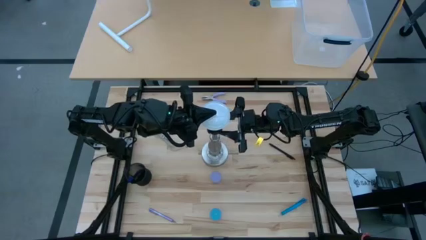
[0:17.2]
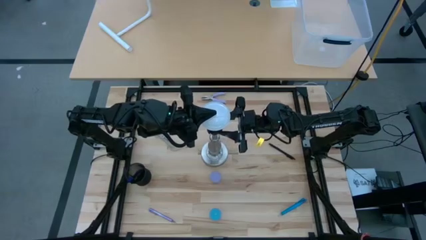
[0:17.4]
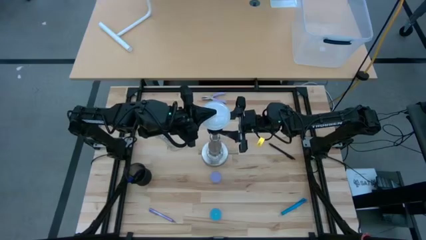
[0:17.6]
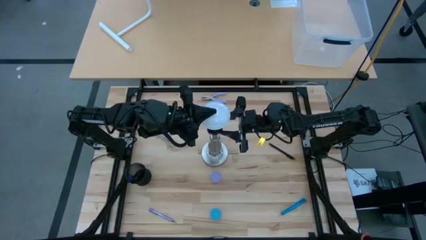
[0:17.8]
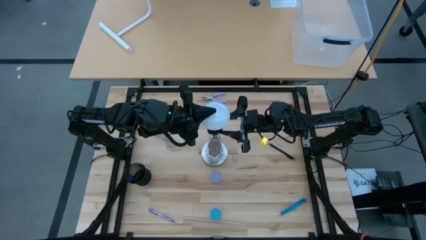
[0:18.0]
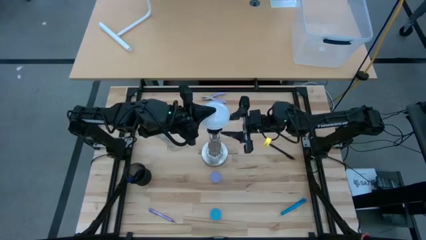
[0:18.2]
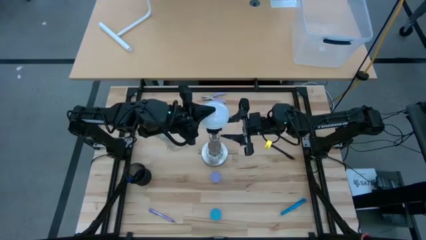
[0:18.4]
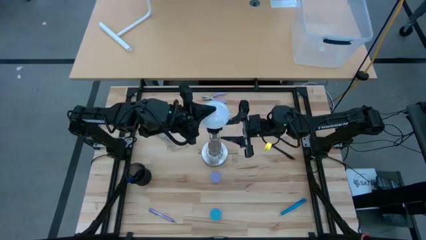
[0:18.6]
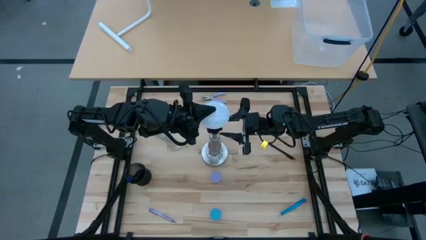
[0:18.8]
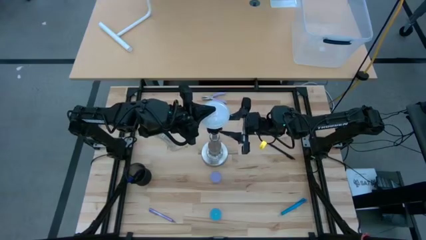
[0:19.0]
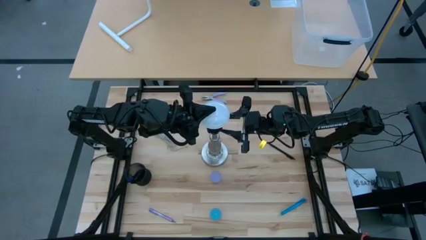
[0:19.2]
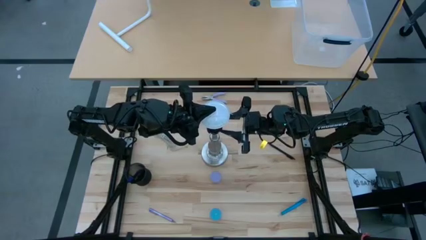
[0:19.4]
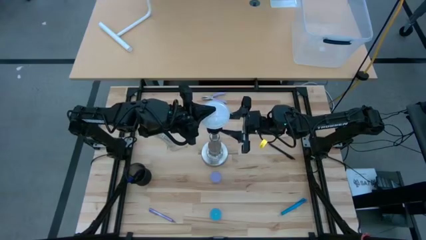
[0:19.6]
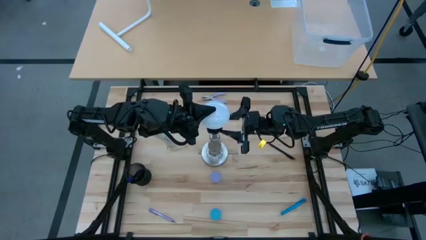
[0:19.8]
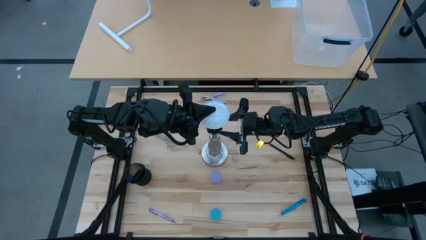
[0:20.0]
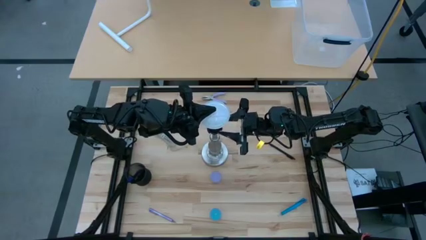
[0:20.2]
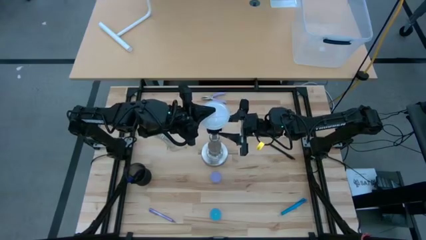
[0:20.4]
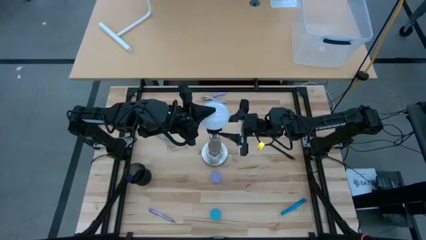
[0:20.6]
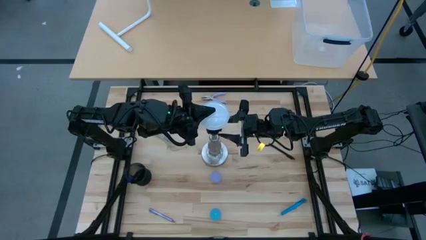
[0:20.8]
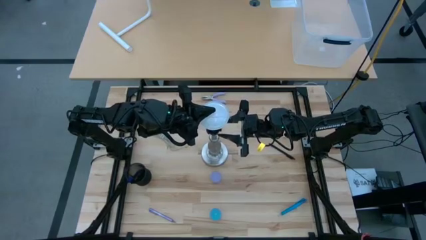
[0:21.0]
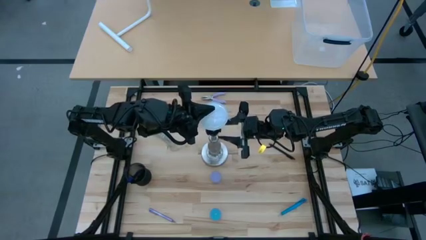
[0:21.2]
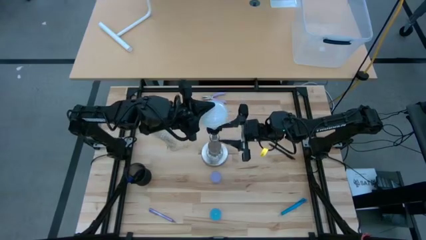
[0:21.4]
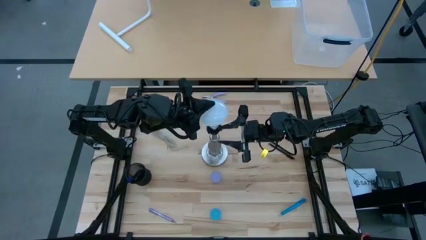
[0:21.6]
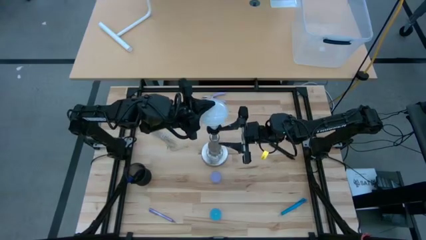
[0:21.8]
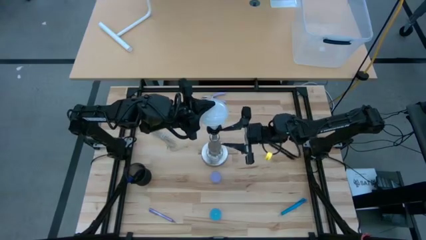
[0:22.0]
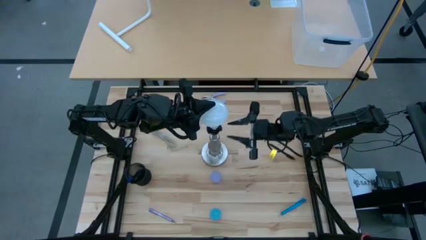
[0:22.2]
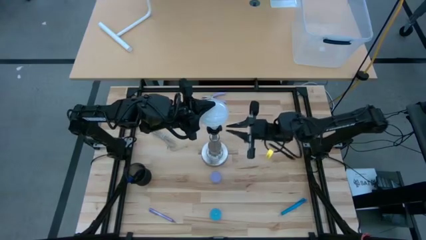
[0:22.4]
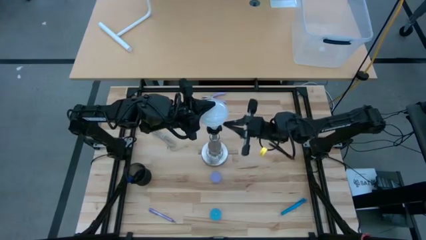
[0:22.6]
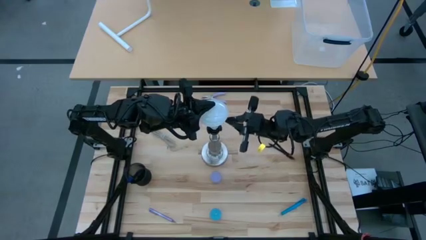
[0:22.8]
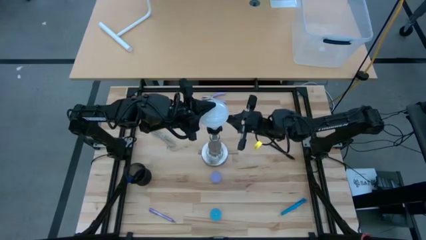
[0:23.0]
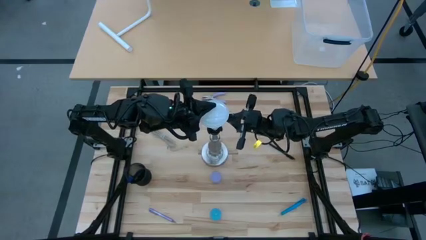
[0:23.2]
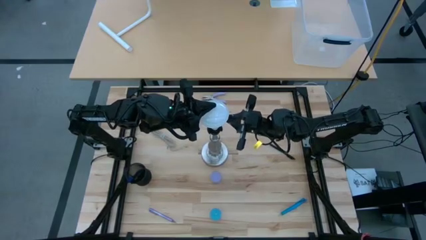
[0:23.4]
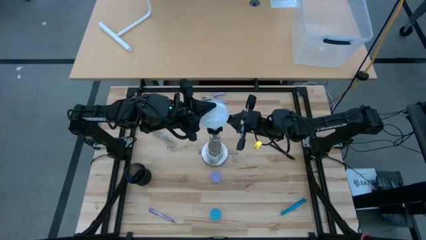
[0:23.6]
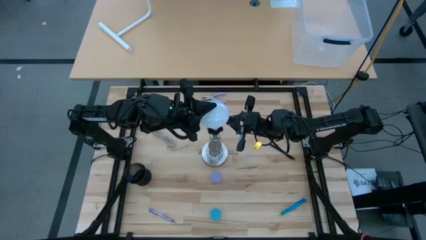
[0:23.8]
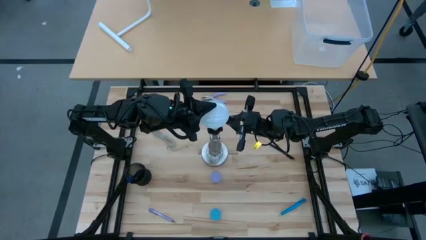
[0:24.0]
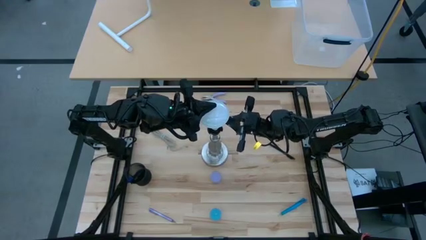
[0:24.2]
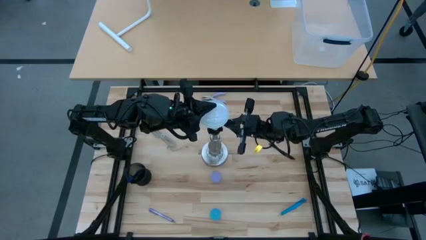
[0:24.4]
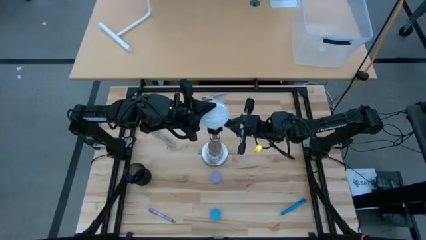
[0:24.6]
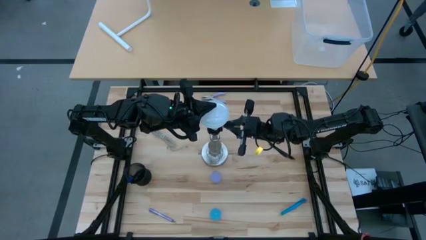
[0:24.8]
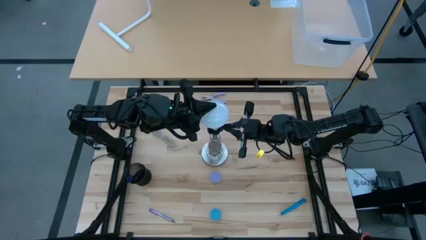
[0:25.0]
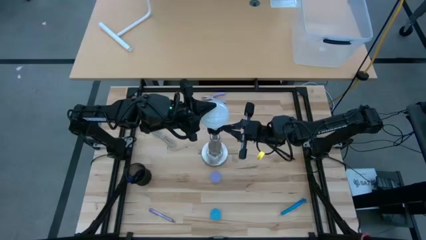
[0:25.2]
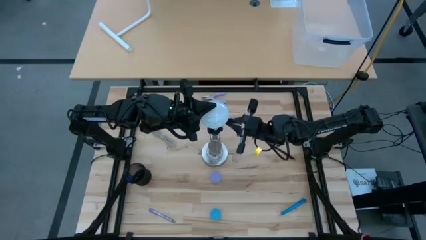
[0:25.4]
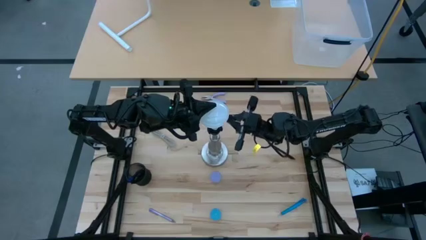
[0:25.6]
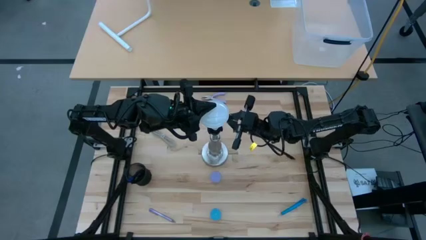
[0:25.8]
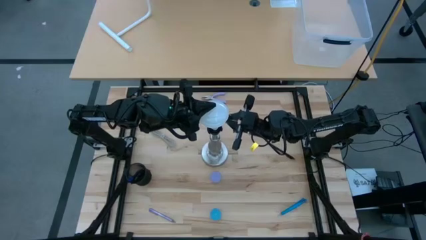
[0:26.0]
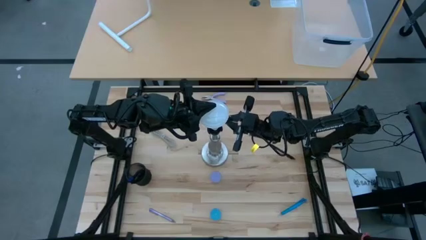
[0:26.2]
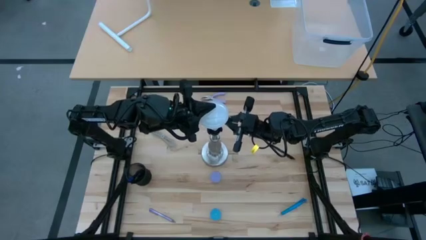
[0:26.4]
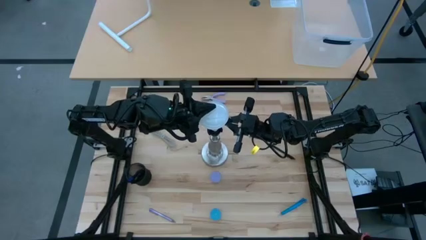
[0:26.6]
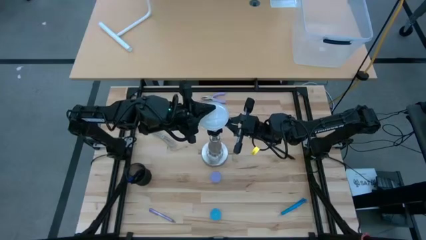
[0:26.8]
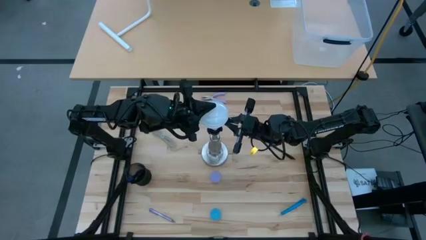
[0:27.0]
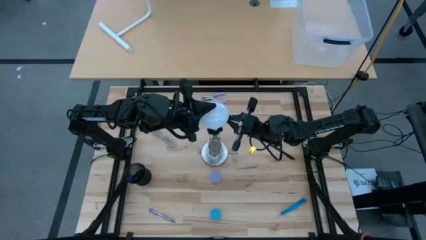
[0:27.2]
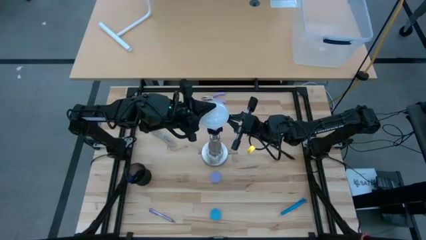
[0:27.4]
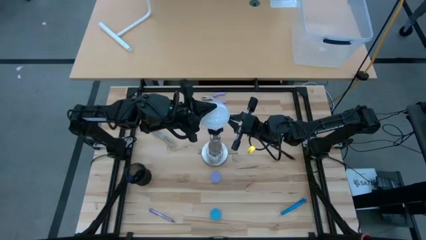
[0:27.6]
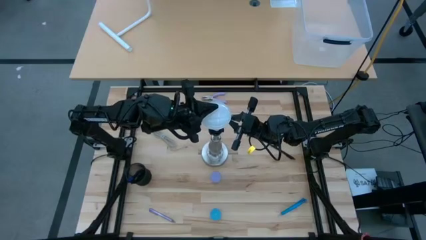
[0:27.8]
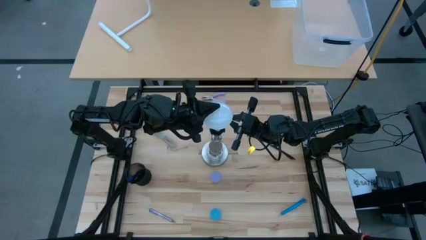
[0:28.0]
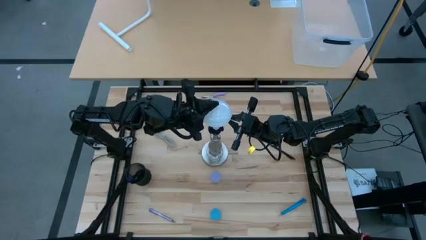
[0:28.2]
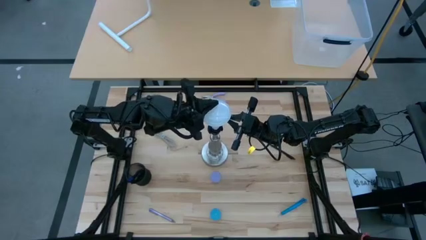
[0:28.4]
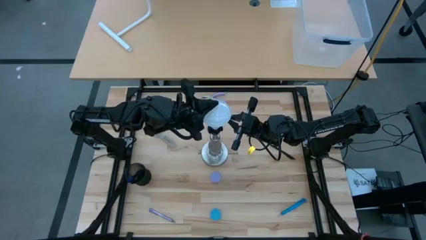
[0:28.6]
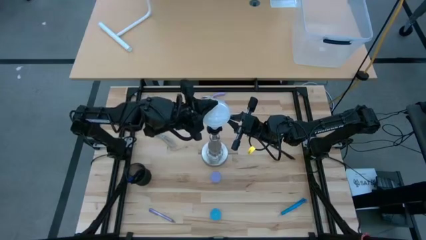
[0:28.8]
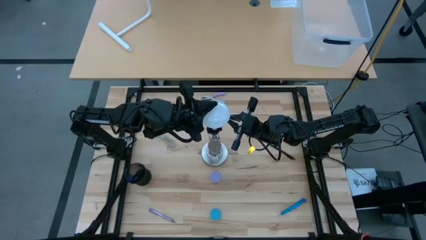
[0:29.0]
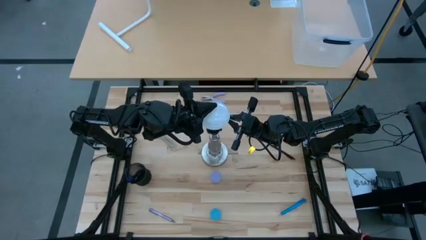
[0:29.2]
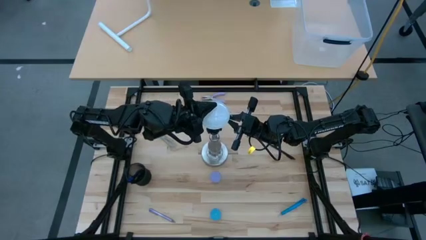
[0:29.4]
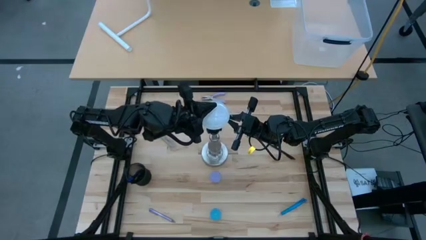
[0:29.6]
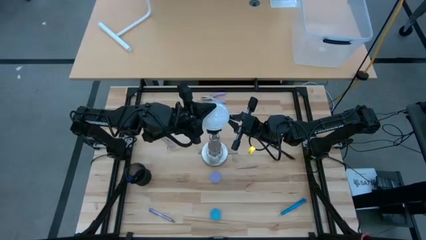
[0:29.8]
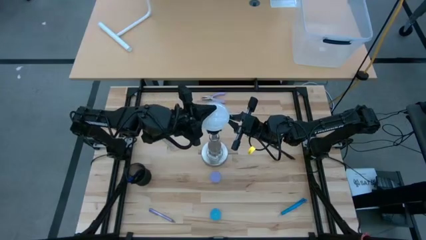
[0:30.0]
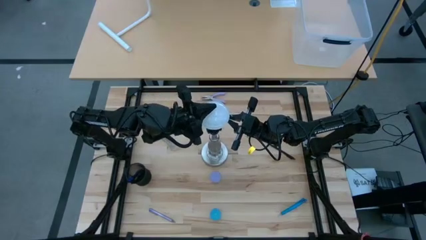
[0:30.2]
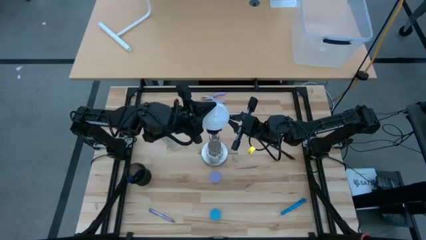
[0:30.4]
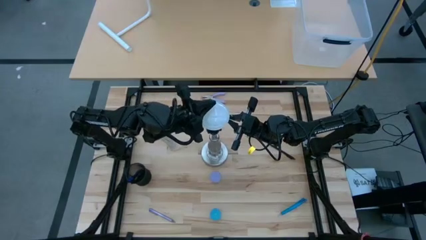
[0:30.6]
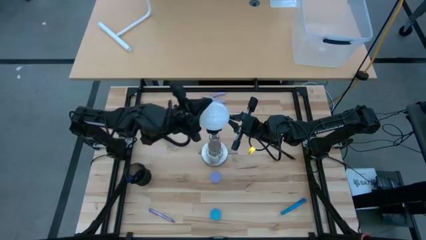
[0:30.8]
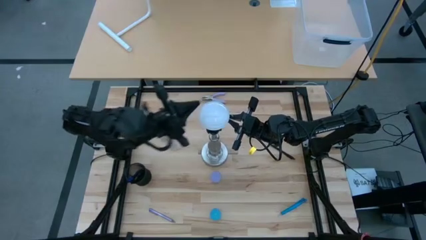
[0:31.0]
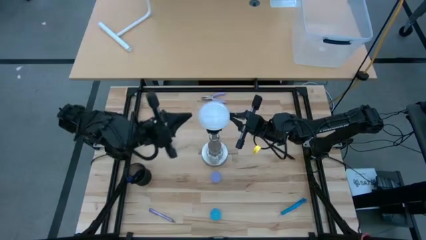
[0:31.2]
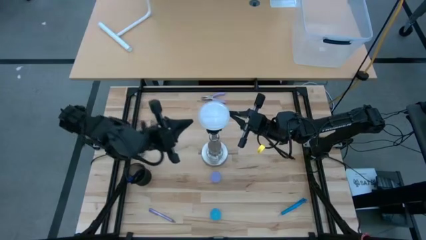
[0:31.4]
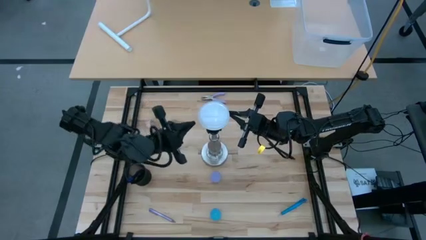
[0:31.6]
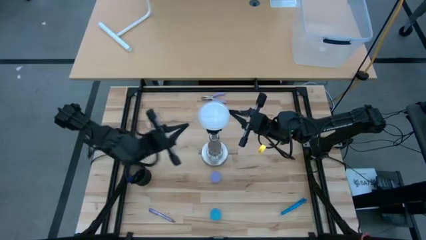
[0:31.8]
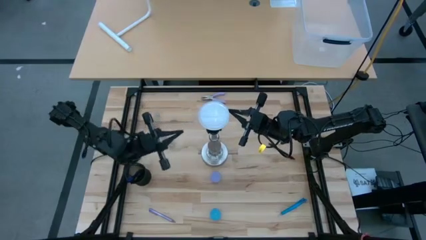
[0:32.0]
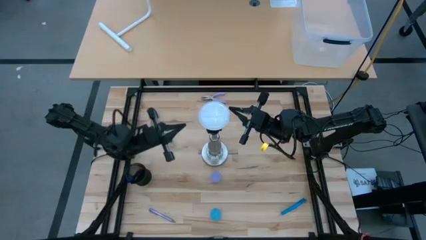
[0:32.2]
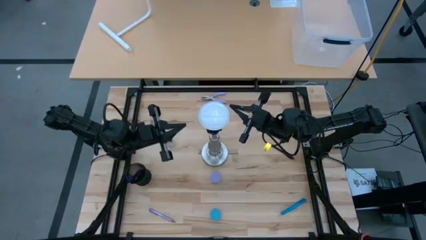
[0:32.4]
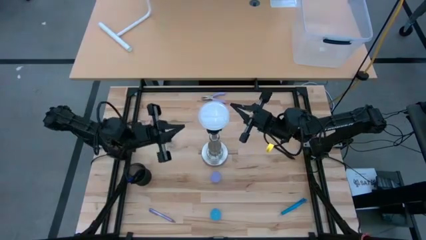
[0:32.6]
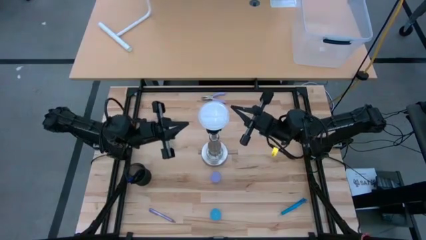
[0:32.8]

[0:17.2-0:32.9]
Task: Screw lightbulb
Insert the lightbulb into the silver lamp socket
